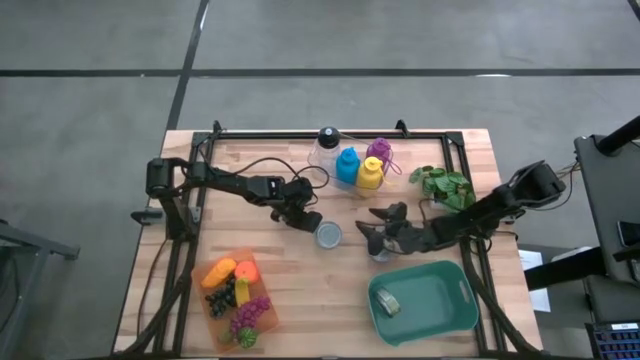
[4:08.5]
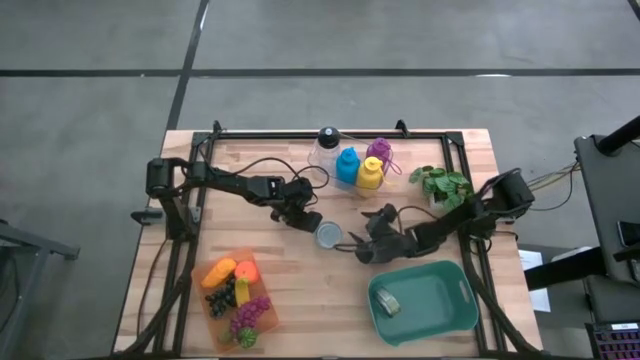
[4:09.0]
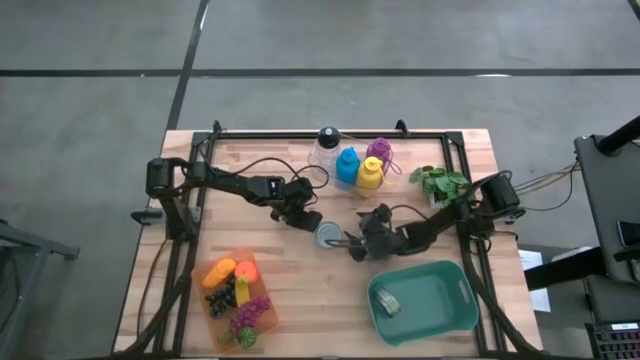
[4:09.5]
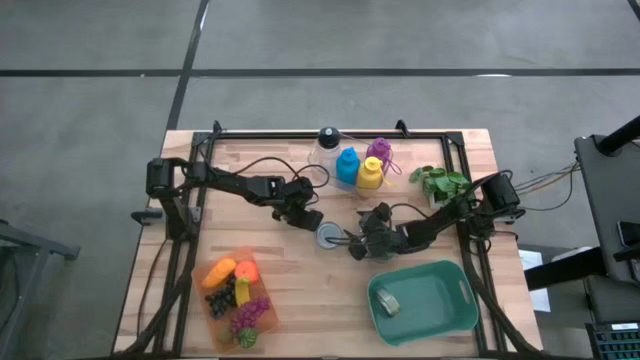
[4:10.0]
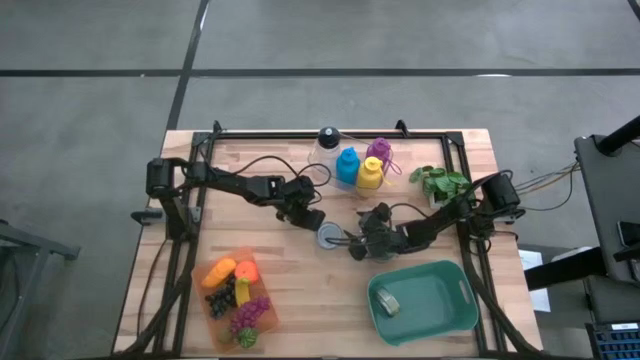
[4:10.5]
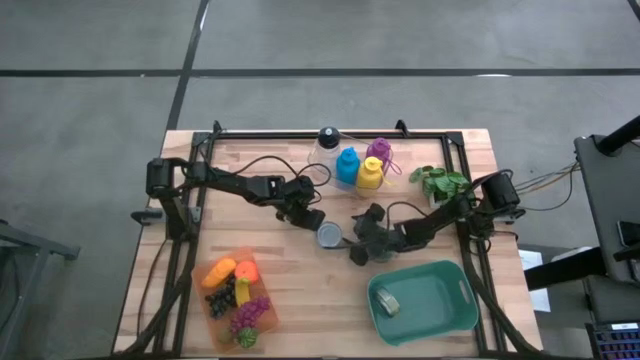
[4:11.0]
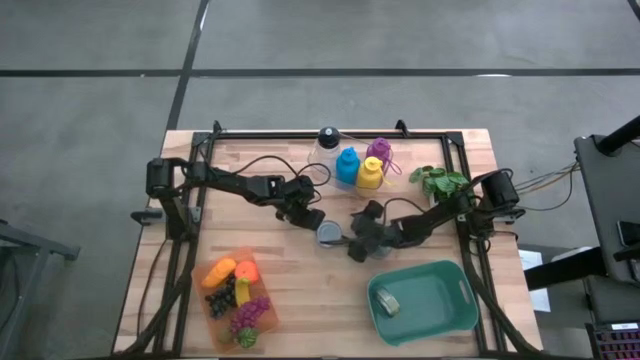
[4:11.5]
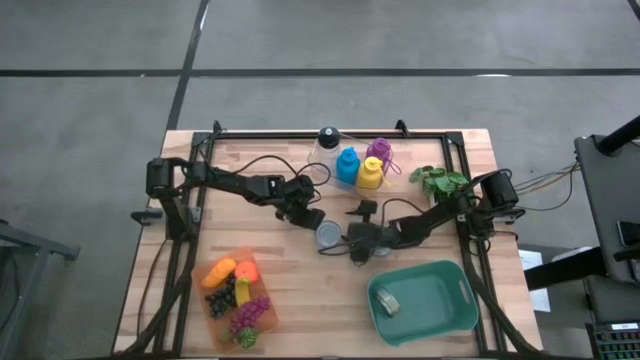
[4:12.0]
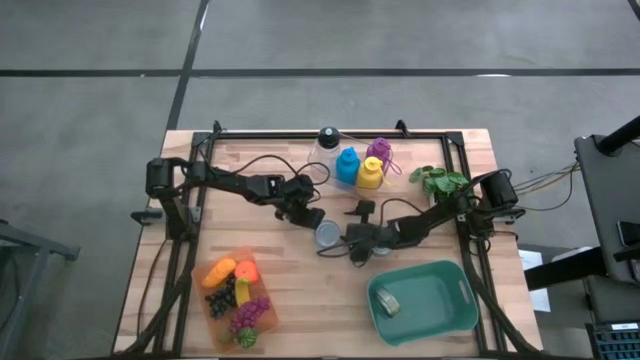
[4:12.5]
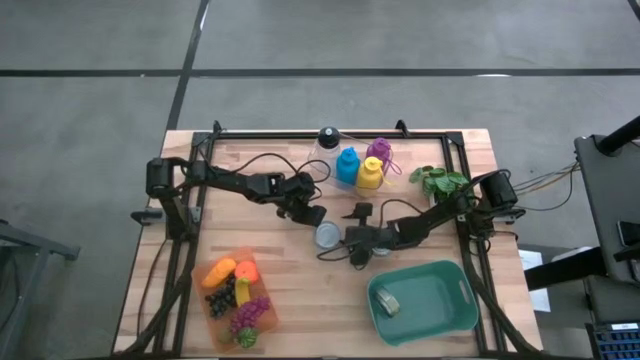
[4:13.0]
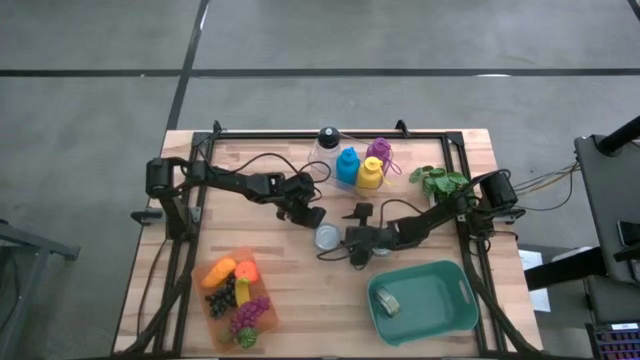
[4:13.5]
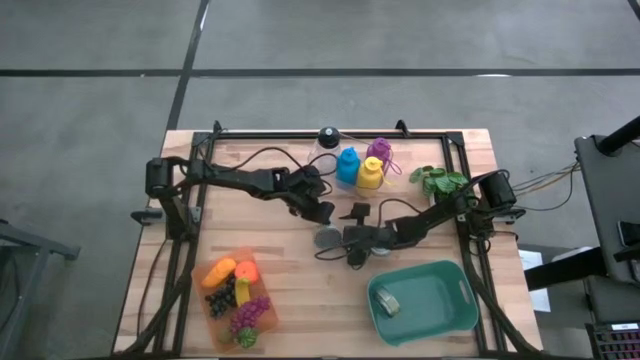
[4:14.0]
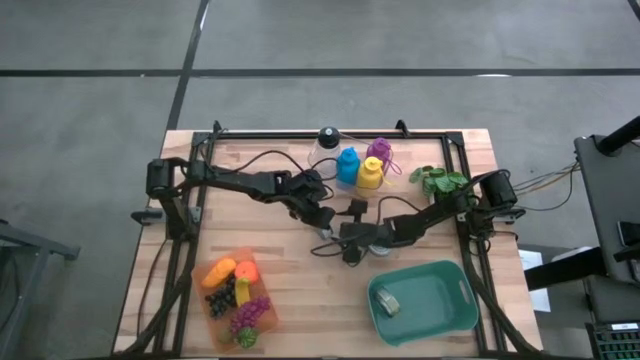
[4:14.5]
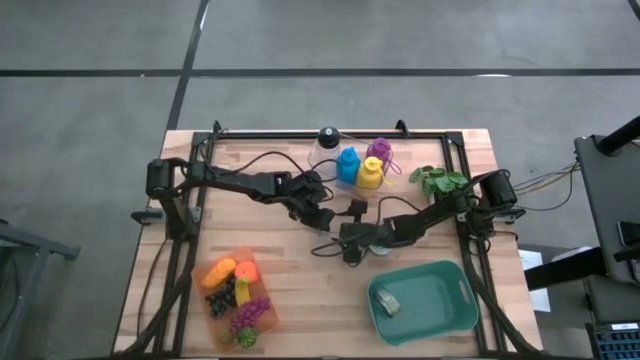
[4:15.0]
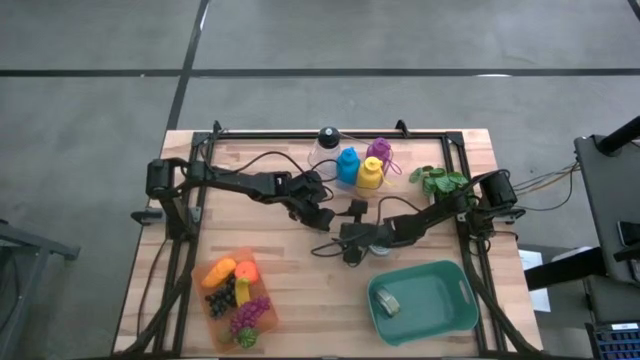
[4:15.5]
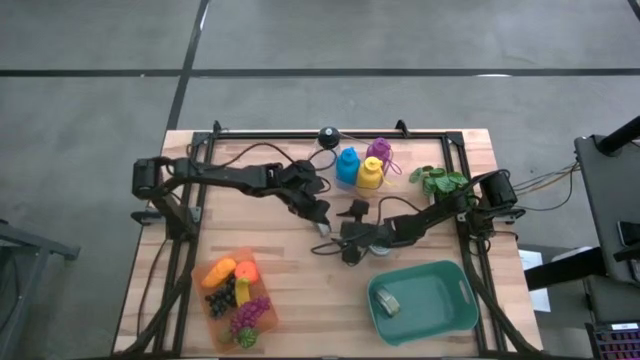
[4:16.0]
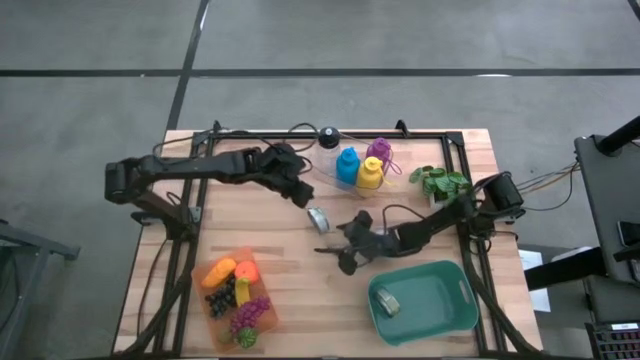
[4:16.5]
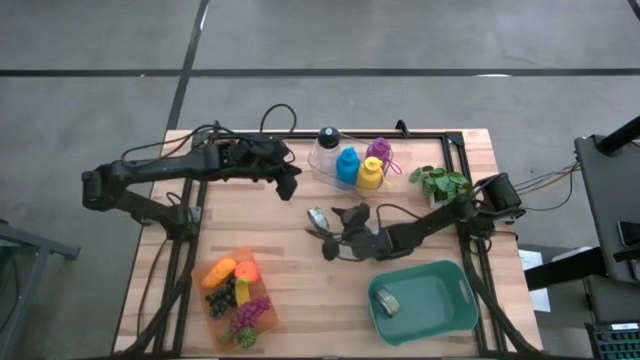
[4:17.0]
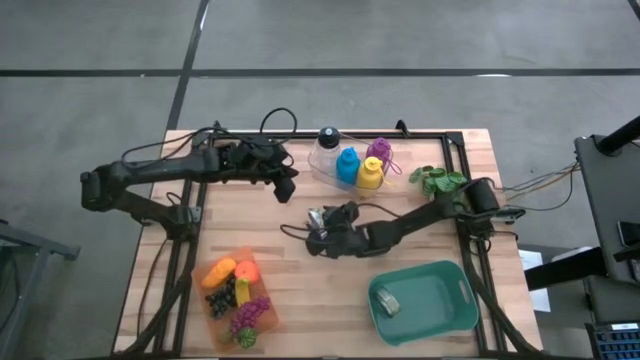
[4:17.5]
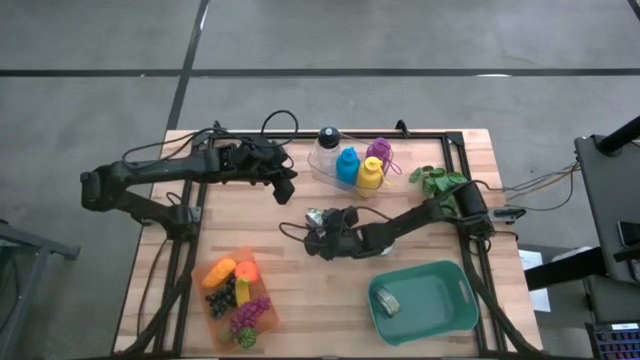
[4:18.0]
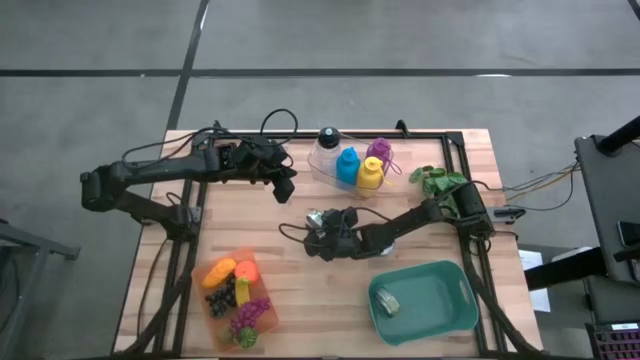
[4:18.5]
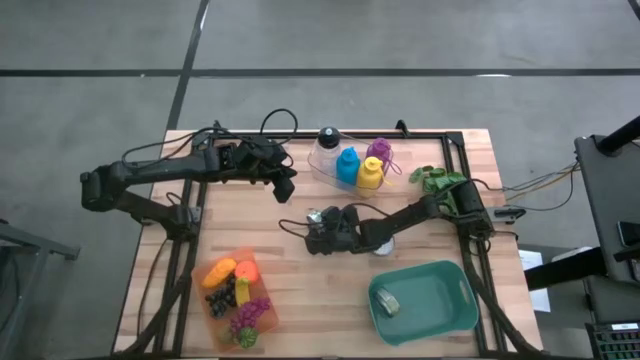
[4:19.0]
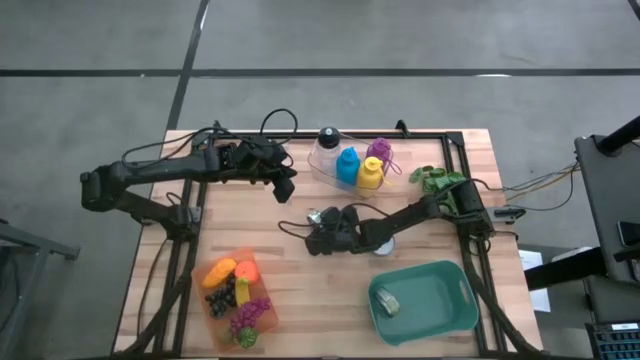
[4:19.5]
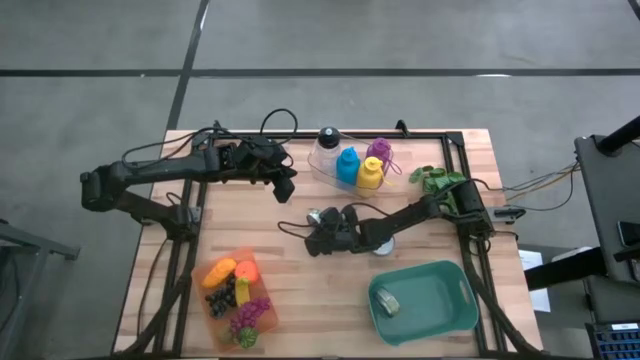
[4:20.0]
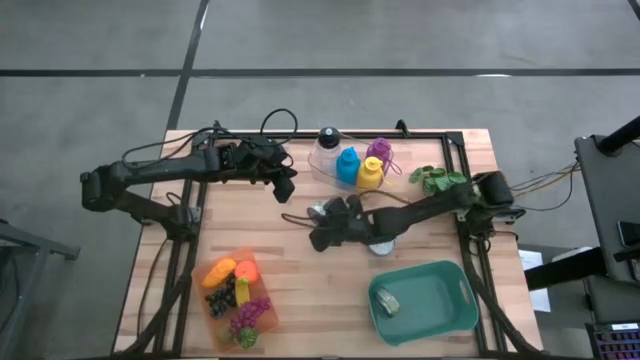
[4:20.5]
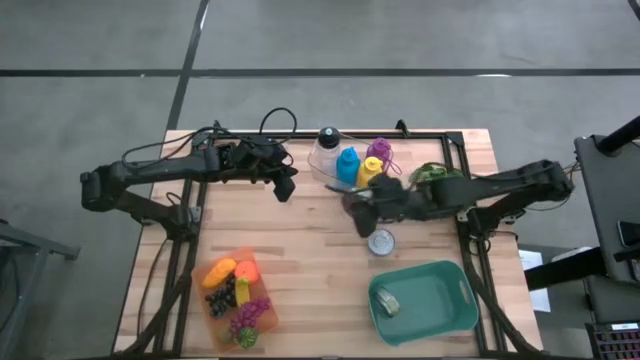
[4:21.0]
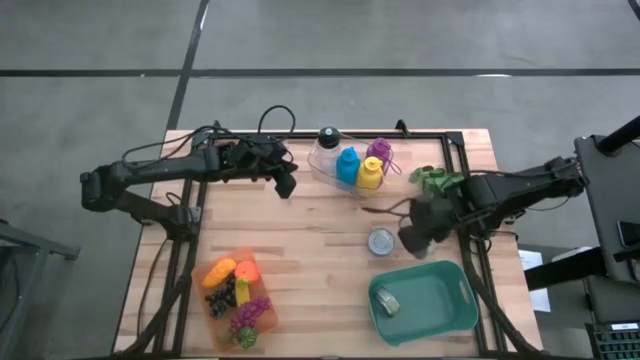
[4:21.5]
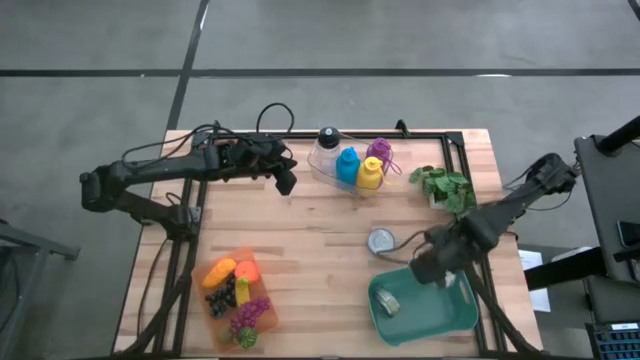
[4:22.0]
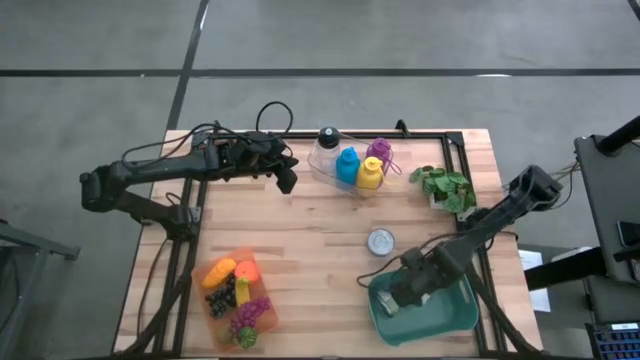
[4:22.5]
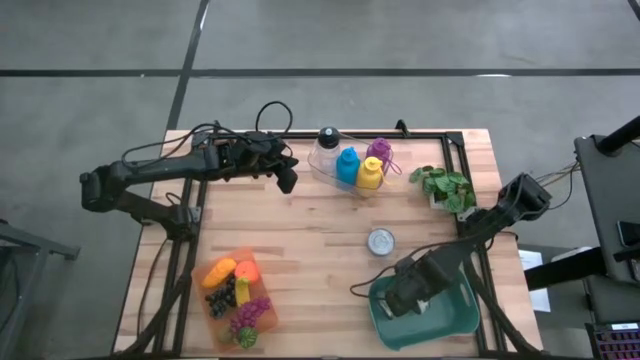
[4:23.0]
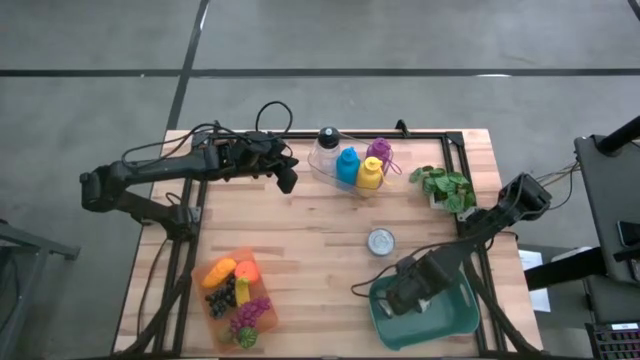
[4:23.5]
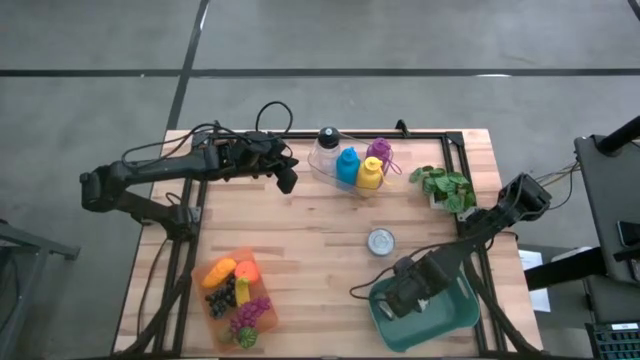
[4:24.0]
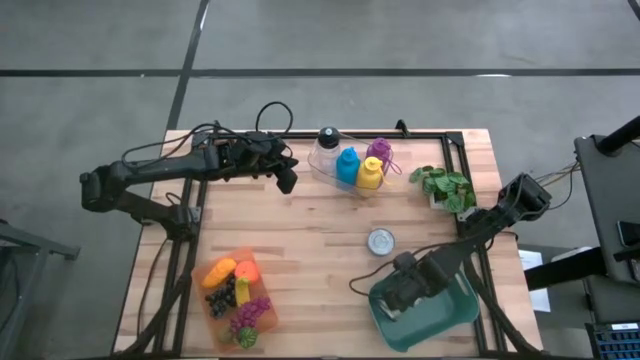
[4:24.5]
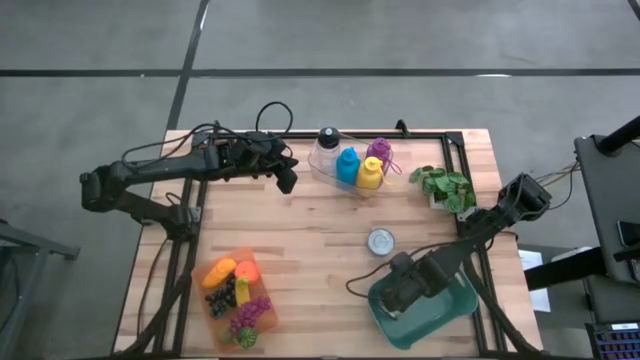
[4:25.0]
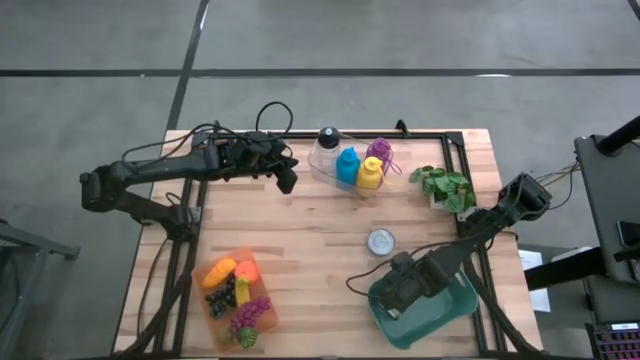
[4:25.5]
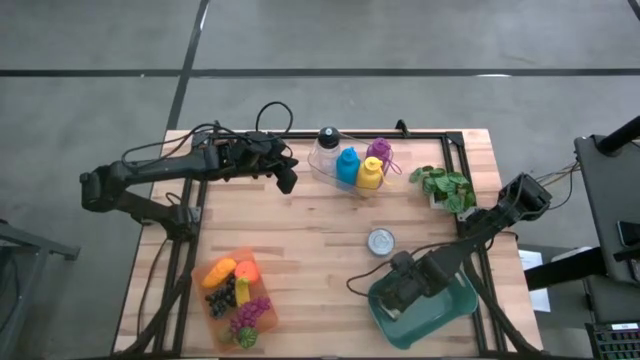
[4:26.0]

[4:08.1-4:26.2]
Task: Pick & Place Food Item
Put the green tuna can into the green bin

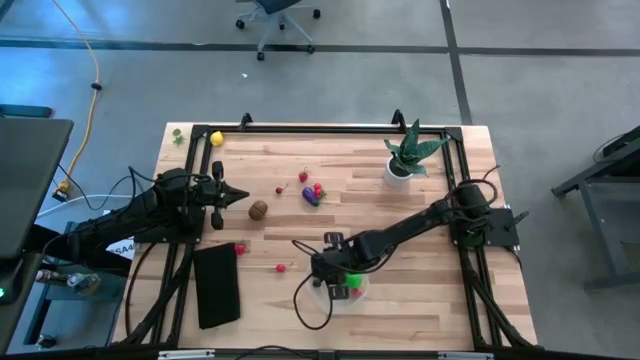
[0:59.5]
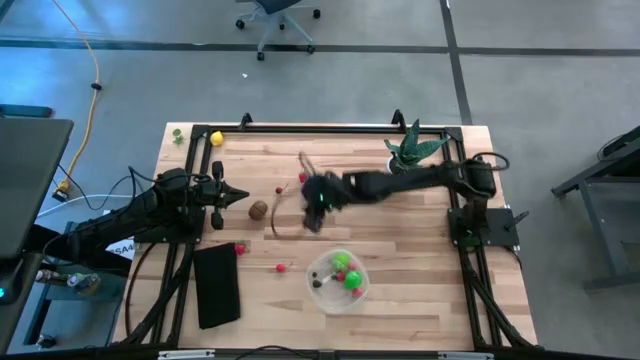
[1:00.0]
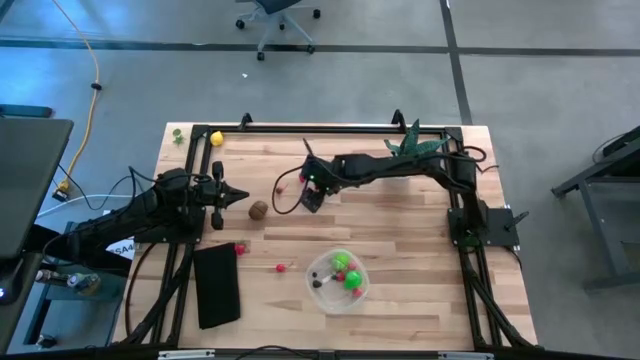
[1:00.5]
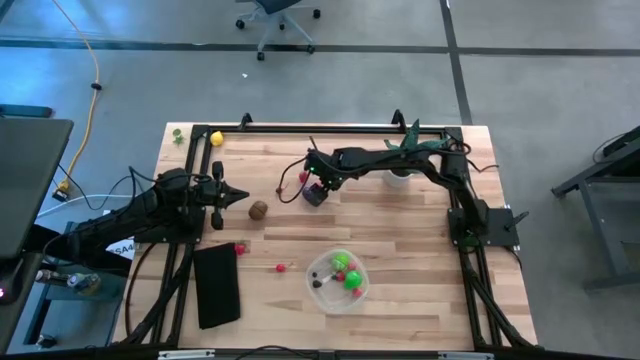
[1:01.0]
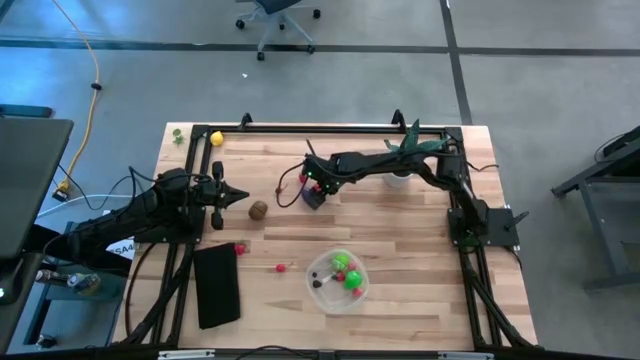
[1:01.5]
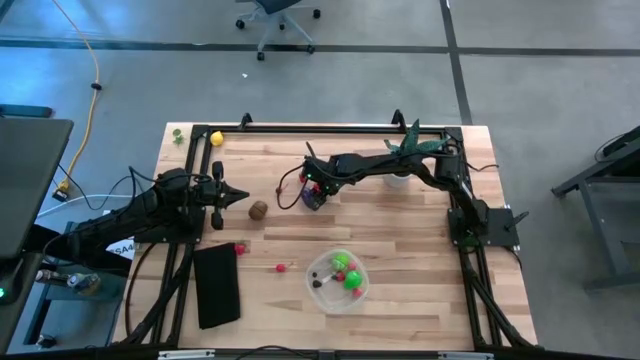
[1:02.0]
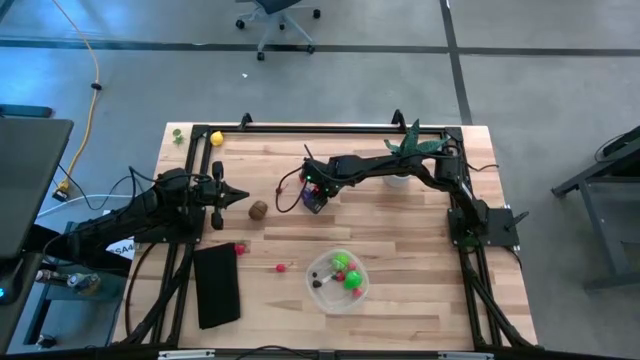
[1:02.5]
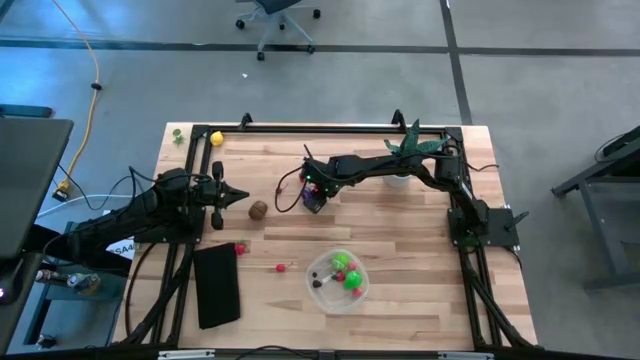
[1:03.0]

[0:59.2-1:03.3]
Task: Pick and placing Produce into tupperware
Put the red strawberry into the transparent container
